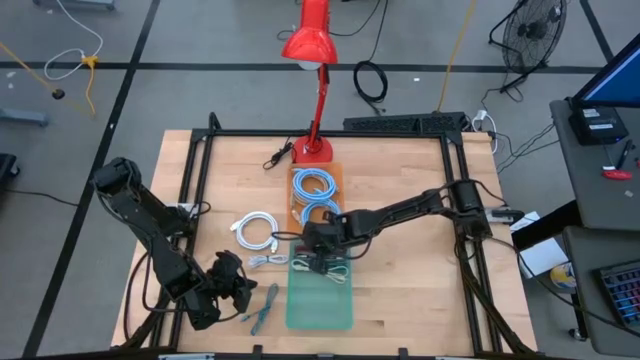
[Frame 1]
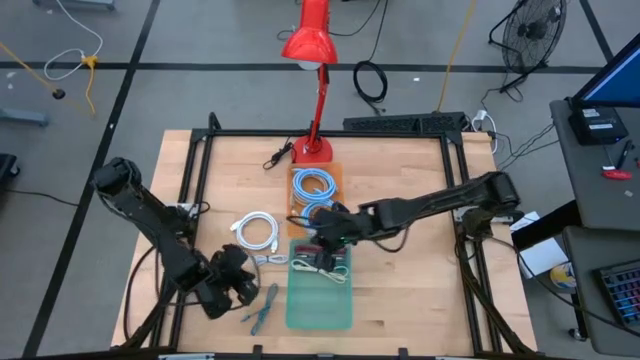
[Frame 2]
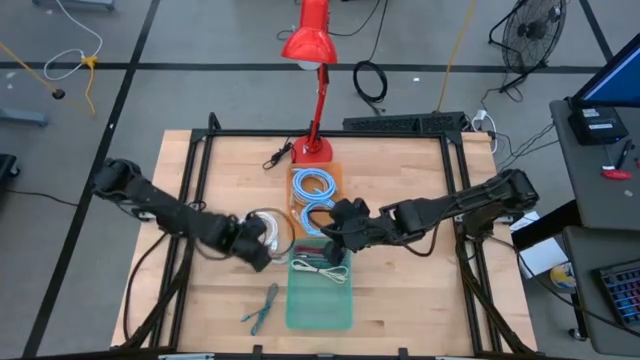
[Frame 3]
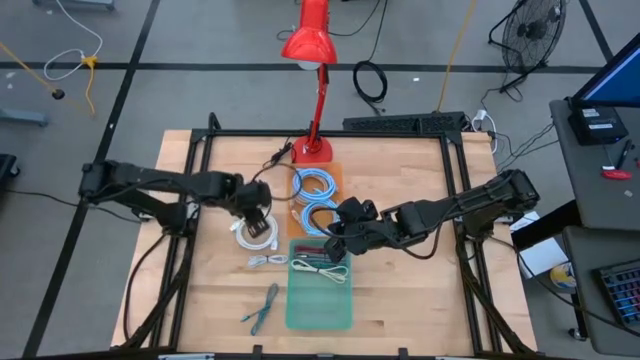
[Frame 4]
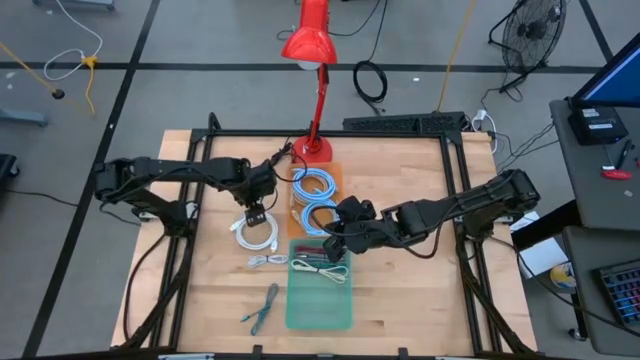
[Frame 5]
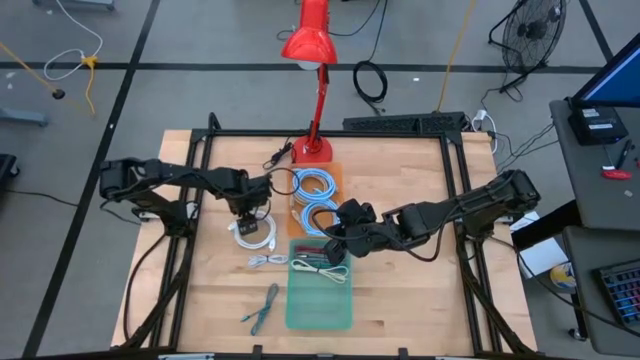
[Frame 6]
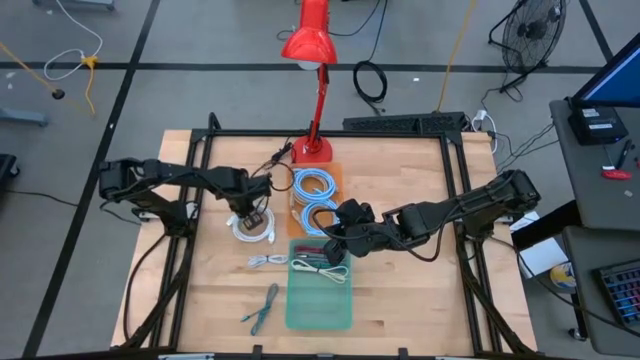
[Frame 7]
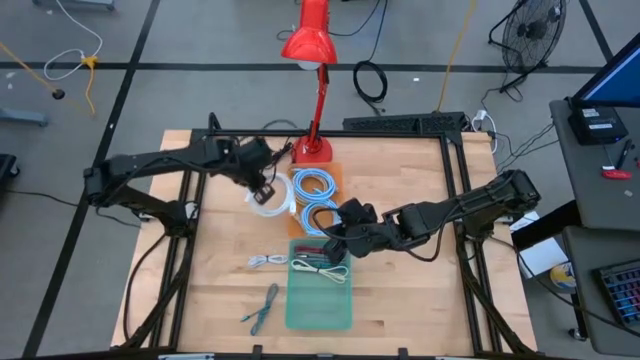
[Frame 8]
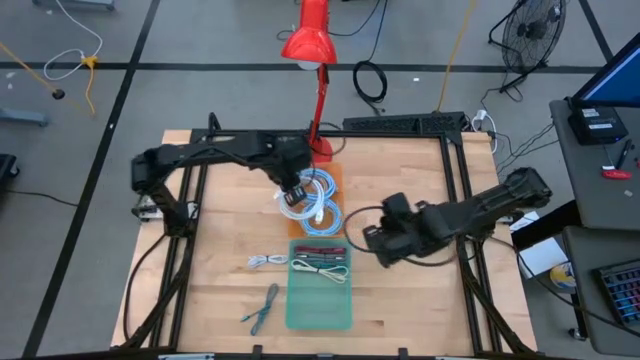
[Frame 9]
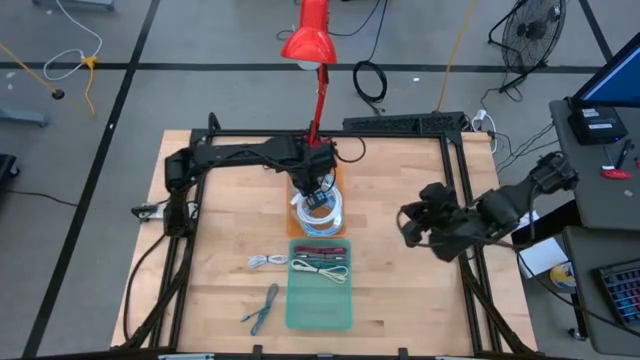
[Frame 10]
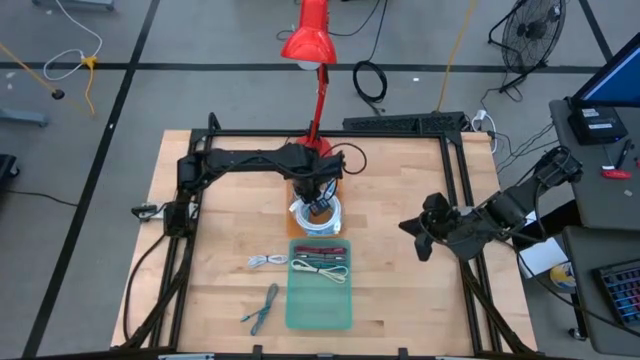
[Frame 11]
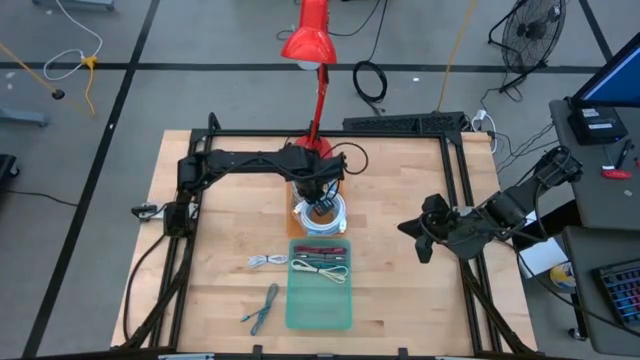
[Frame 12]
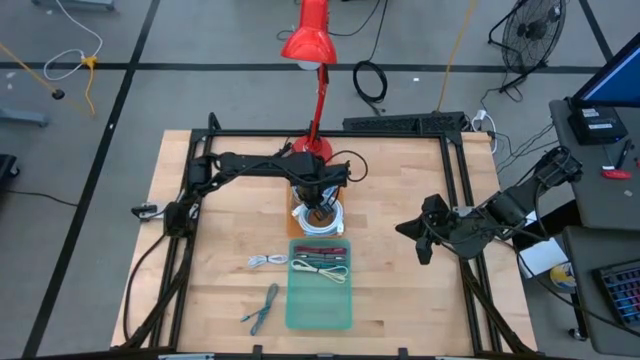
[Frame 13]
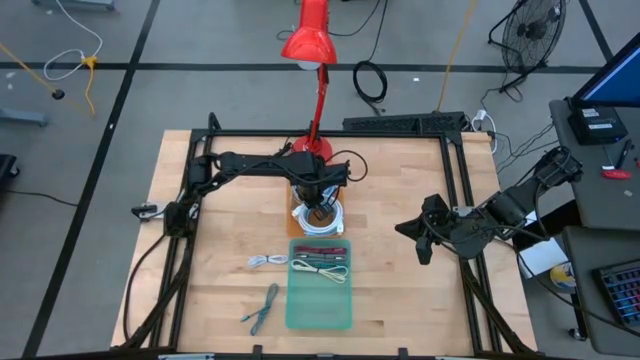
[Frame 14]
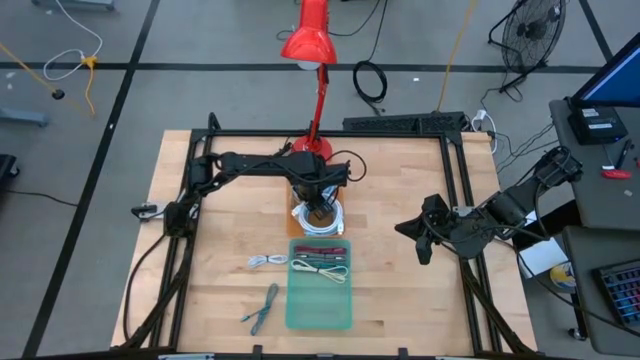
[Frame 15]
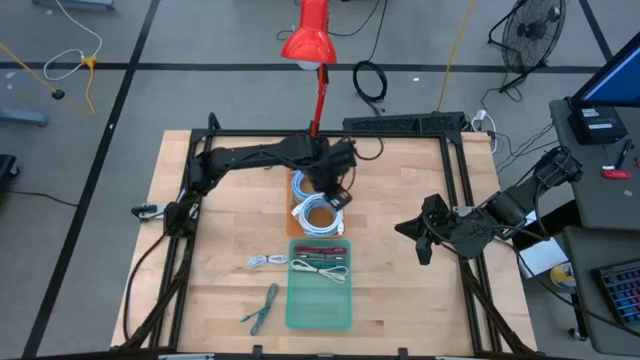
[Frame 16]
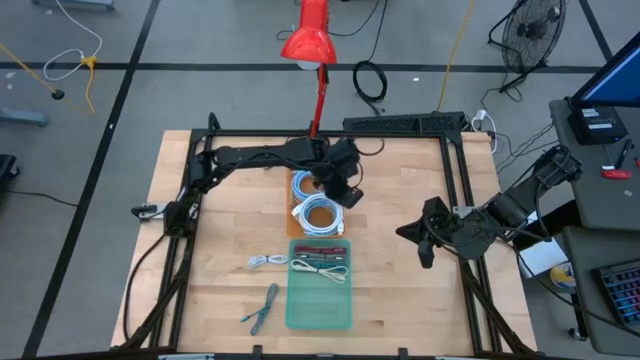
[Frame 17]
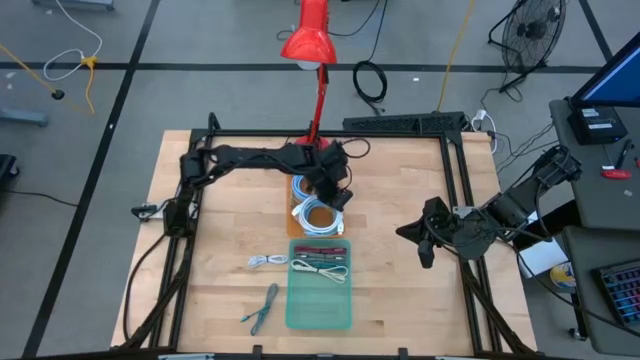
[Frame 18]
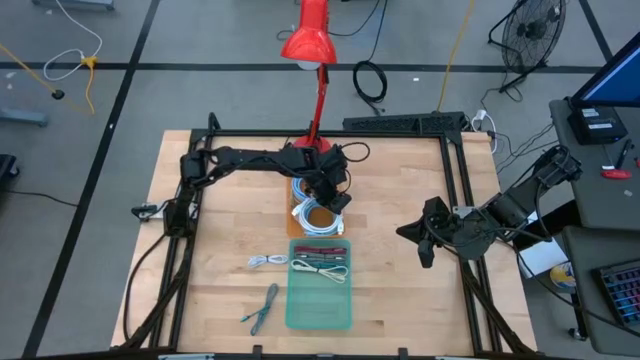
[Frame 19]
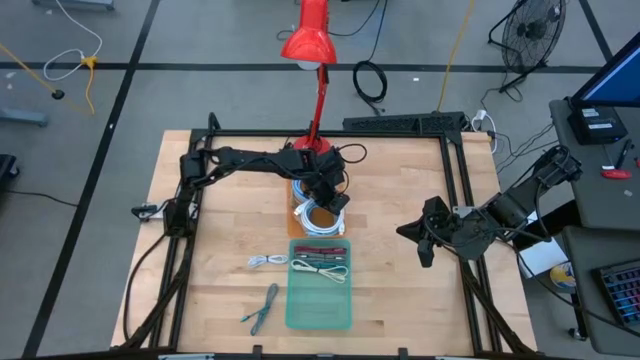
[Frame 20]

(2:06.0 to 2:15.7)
Task: Sort cables
Put the white video cable into the orange bin

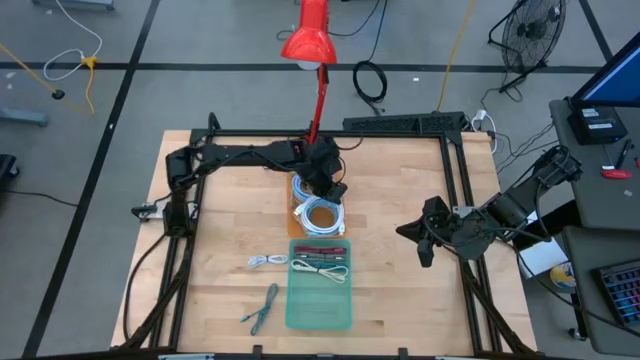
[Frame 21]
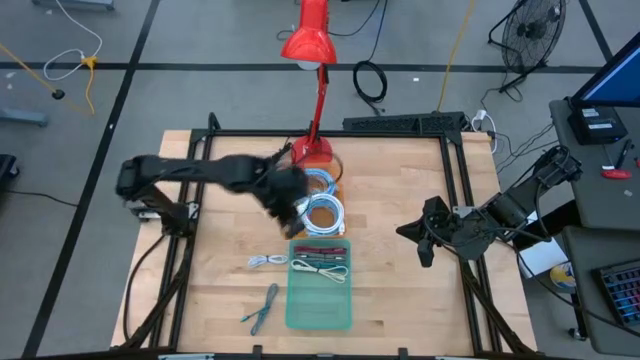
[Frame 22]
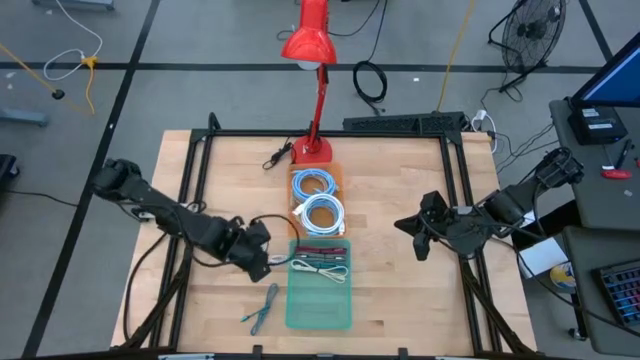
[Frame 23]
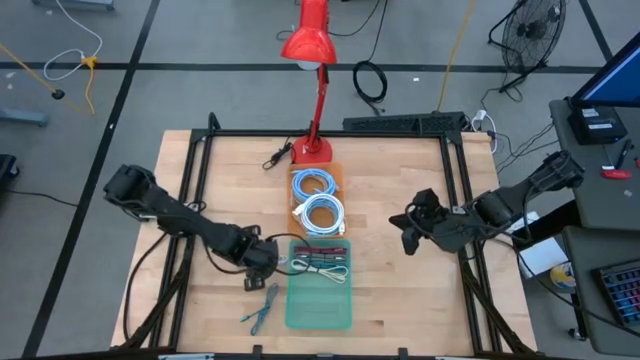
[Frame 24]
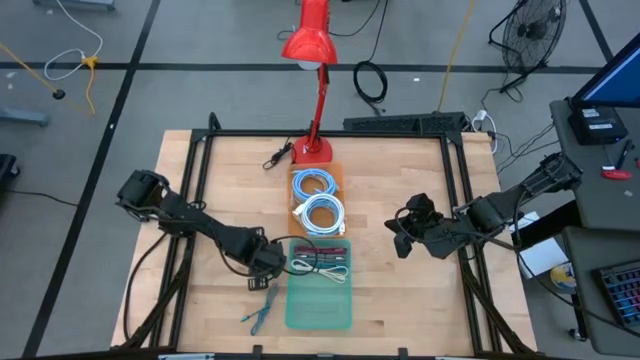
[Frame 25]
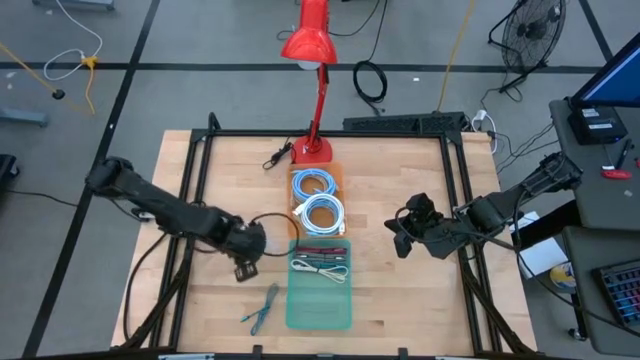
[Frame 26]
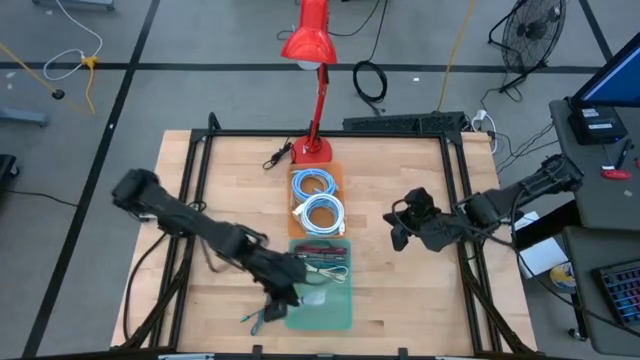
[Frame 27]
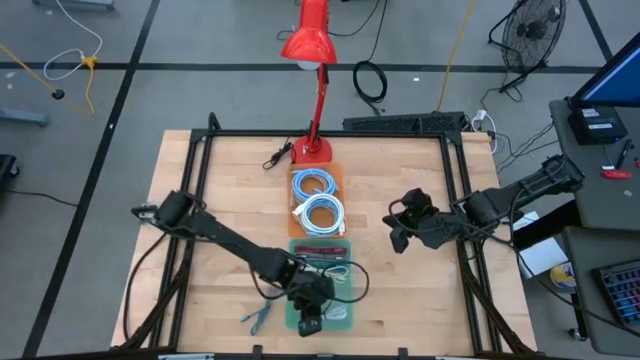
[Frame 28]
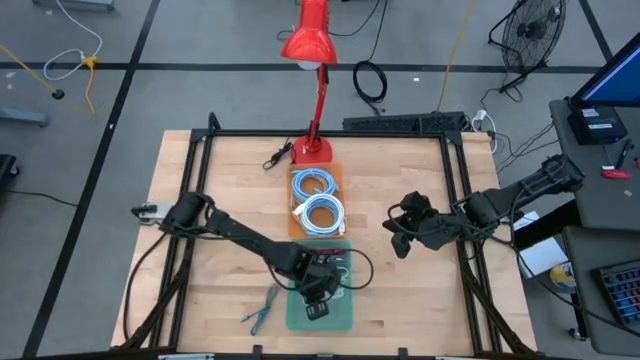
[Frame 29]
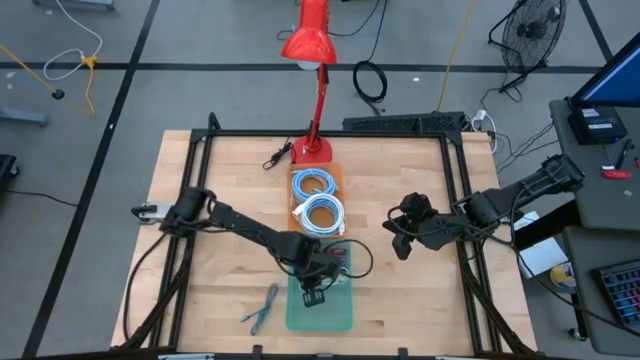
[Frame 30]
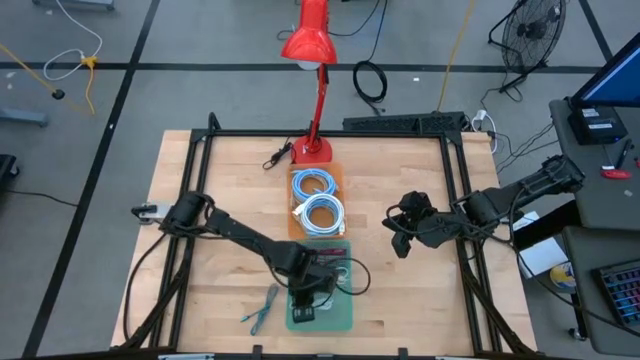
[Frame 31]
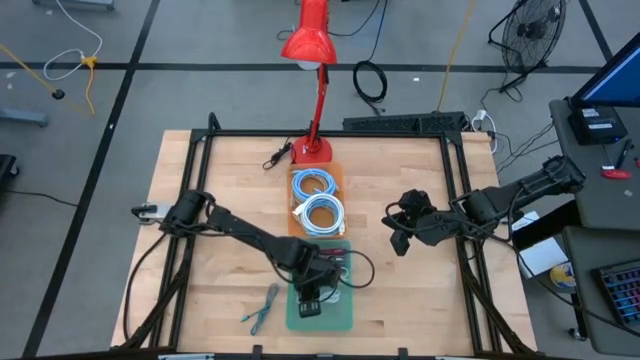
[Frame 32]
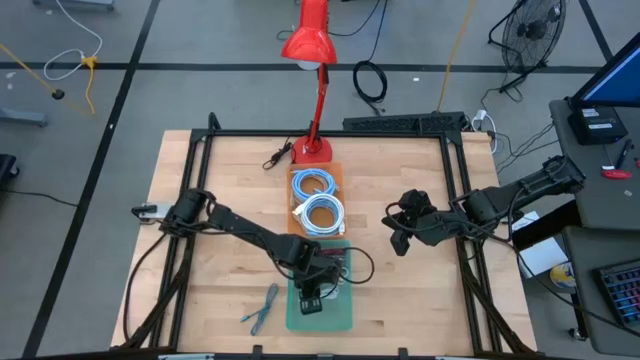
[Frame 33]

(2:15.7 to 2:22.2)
Put the white charger cable into the blue bin

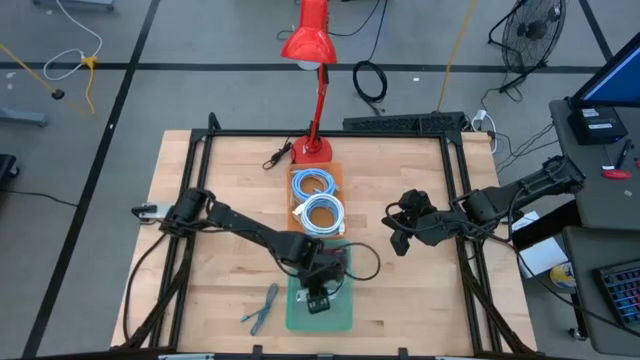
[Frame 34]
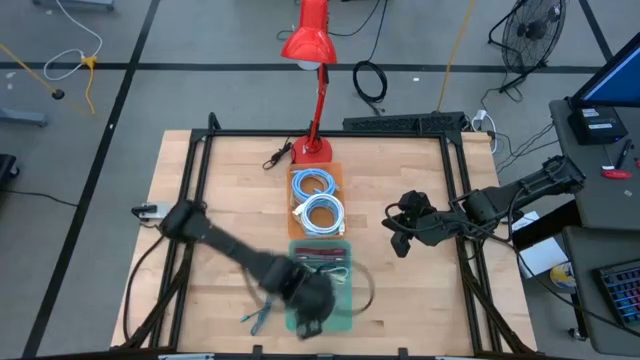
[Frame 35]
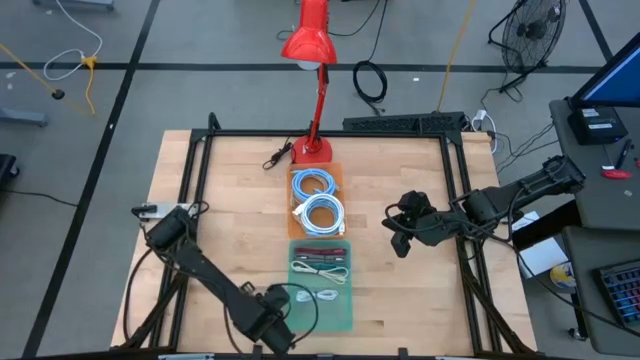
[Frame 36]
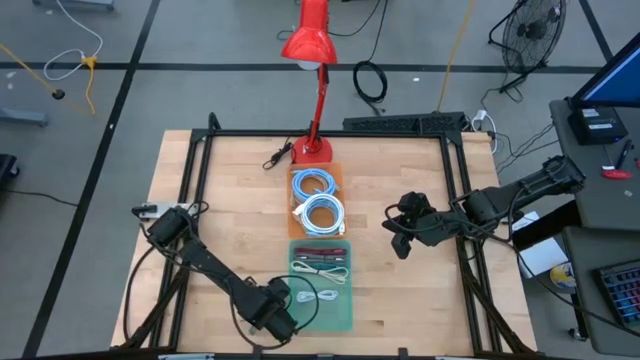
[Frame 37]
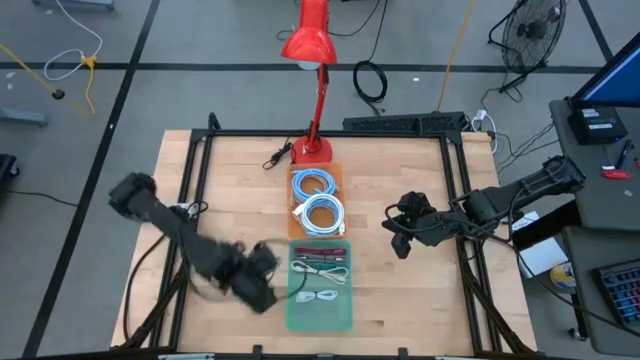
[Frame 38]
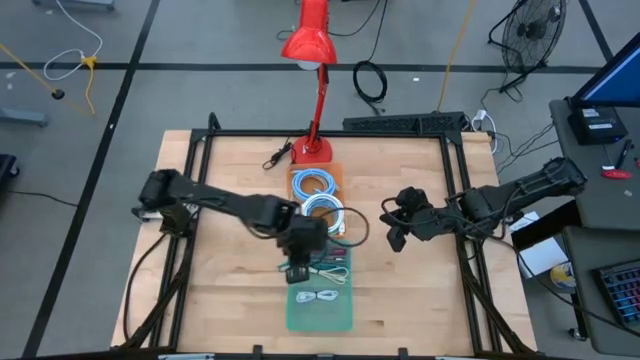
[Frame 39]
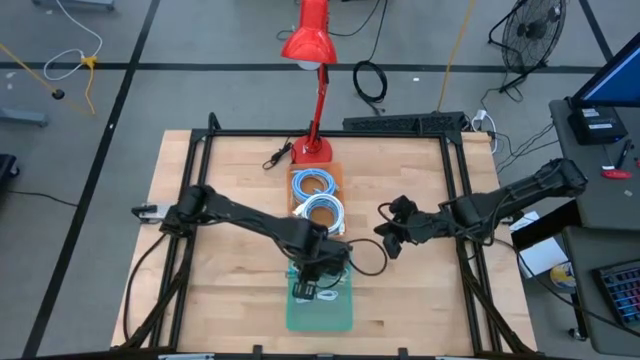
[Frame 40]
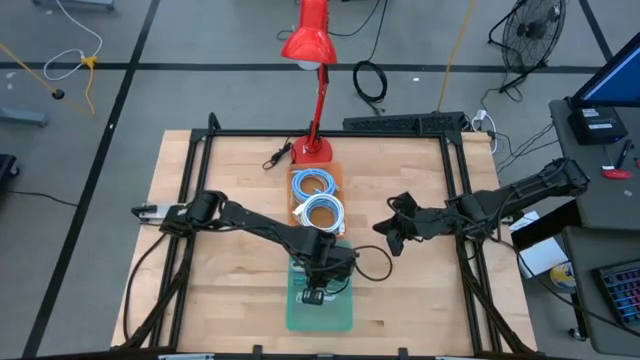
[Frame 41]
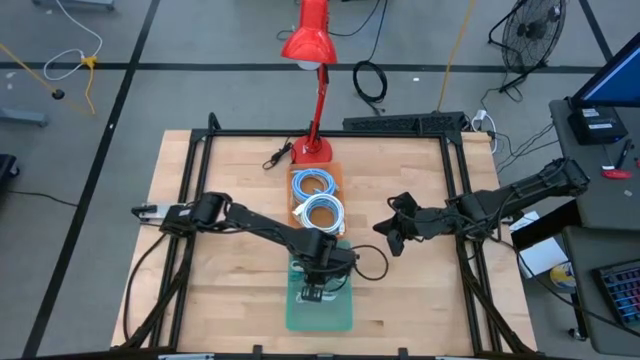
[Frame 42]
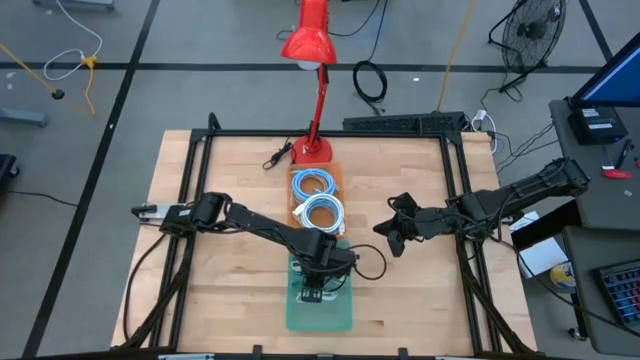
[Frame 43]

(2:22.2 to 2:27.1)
Put the blue charger cable into the blue bin
